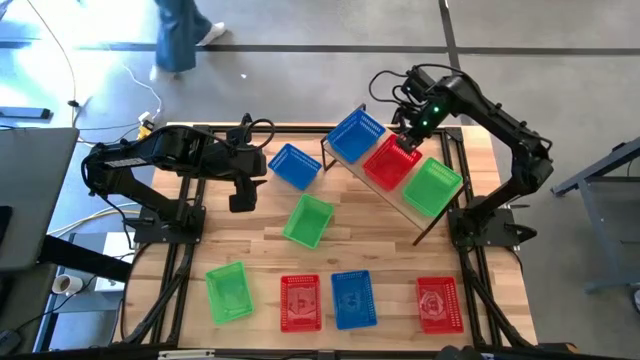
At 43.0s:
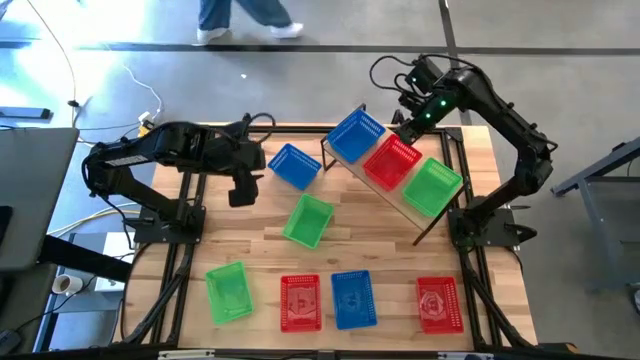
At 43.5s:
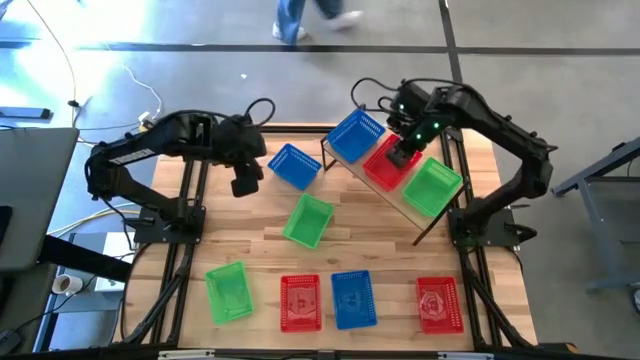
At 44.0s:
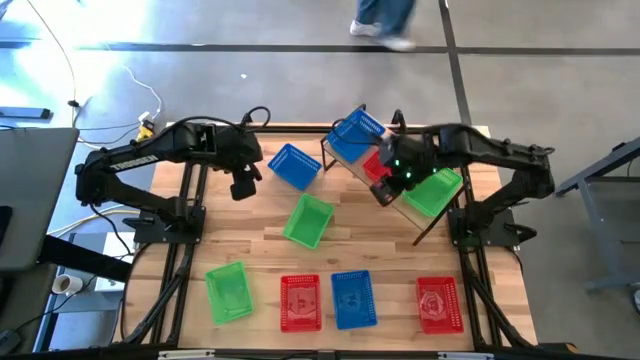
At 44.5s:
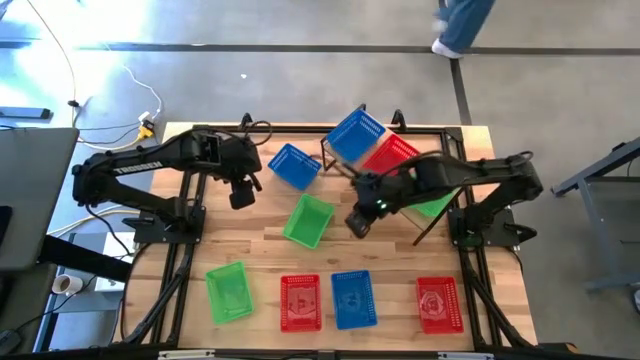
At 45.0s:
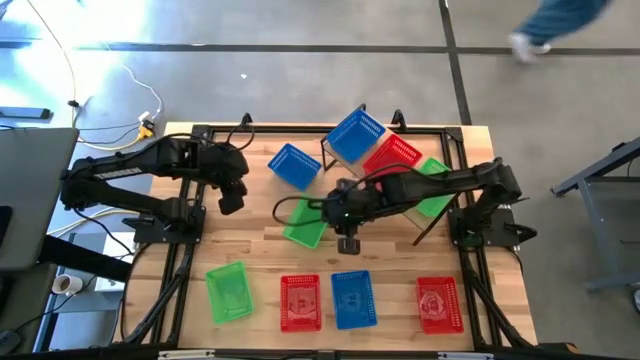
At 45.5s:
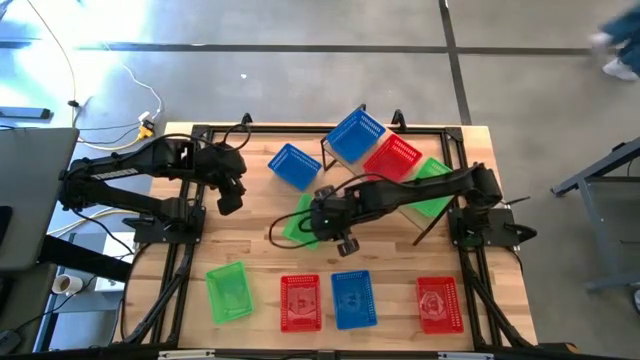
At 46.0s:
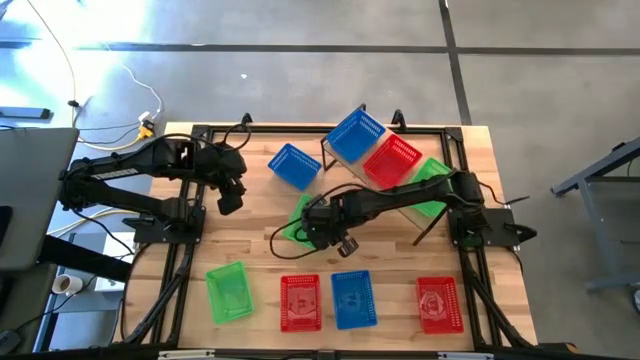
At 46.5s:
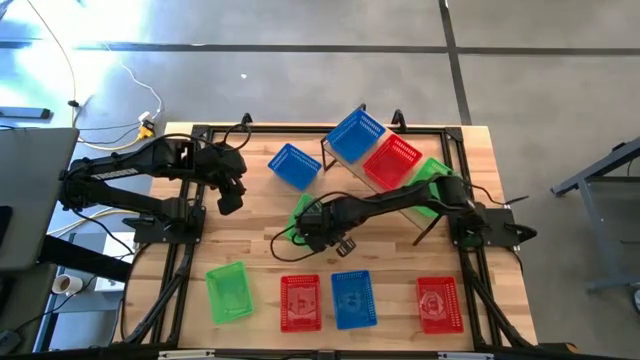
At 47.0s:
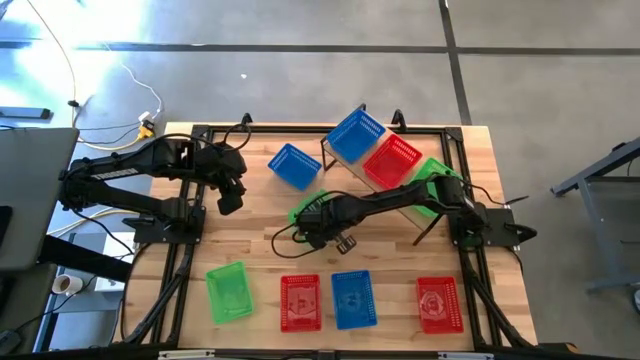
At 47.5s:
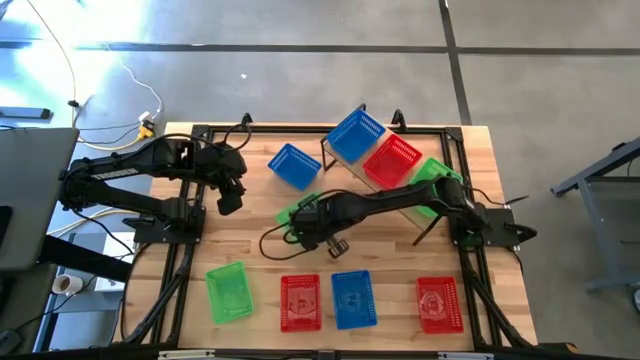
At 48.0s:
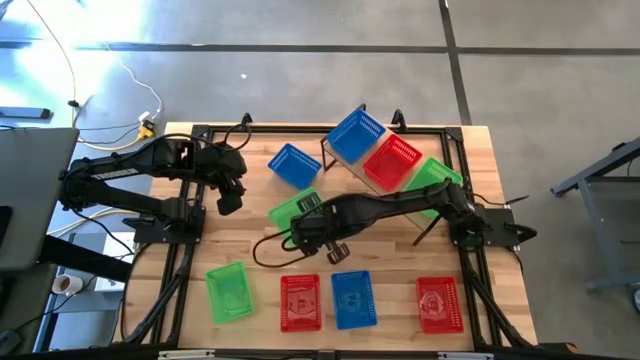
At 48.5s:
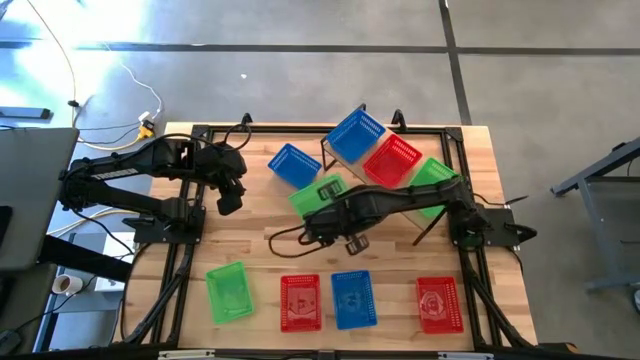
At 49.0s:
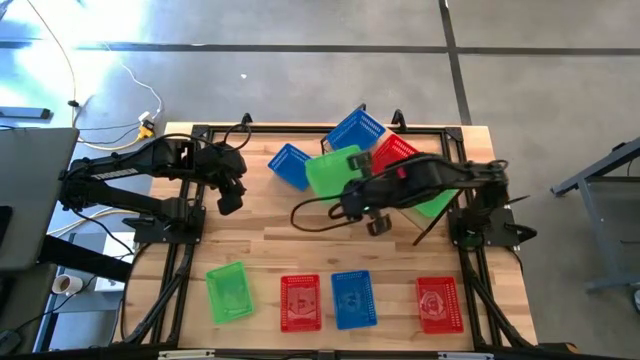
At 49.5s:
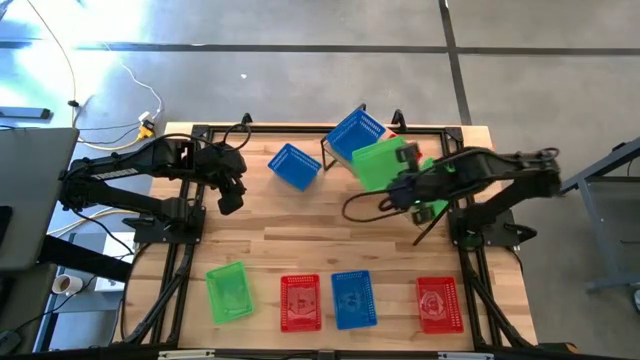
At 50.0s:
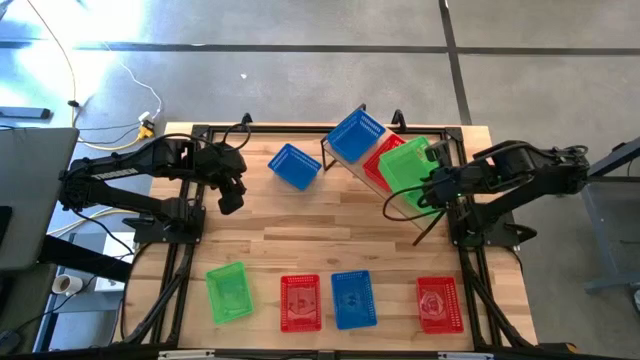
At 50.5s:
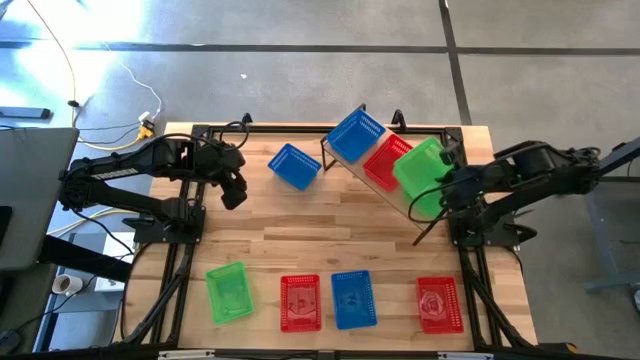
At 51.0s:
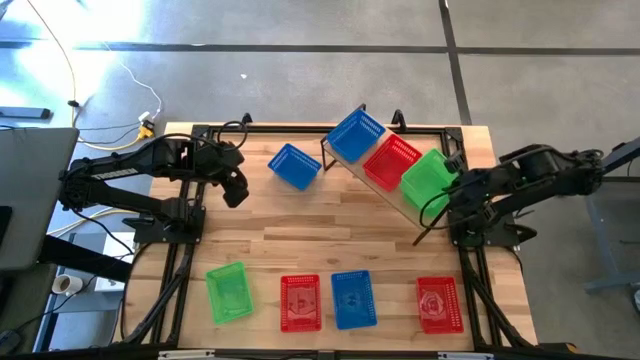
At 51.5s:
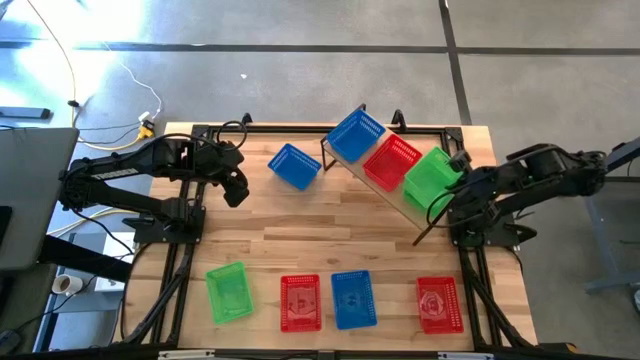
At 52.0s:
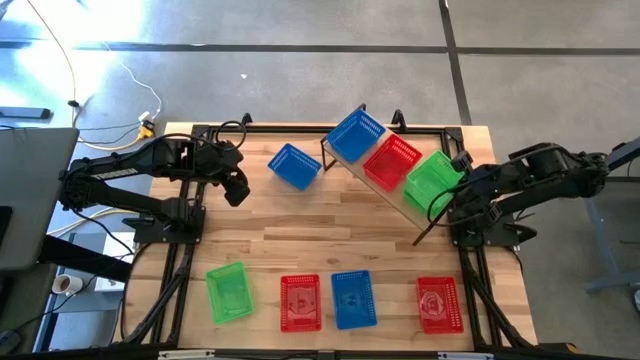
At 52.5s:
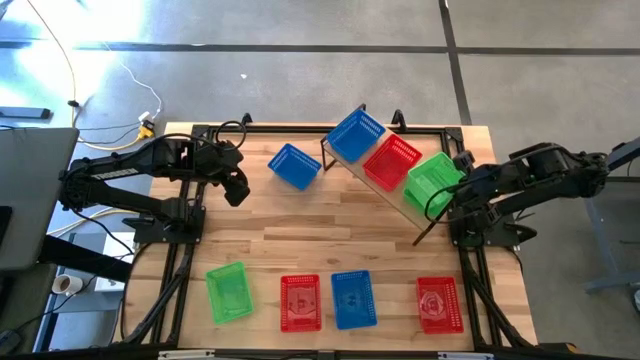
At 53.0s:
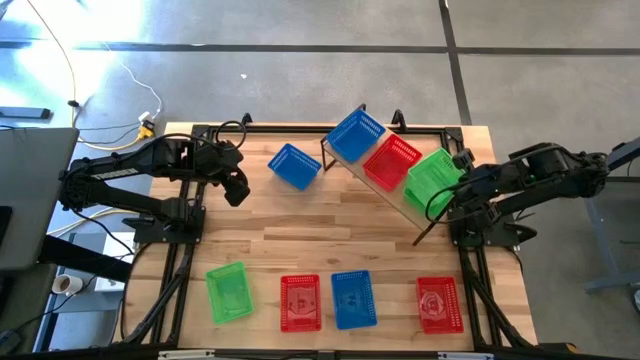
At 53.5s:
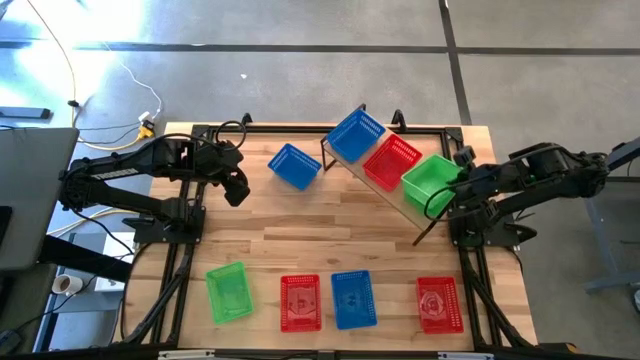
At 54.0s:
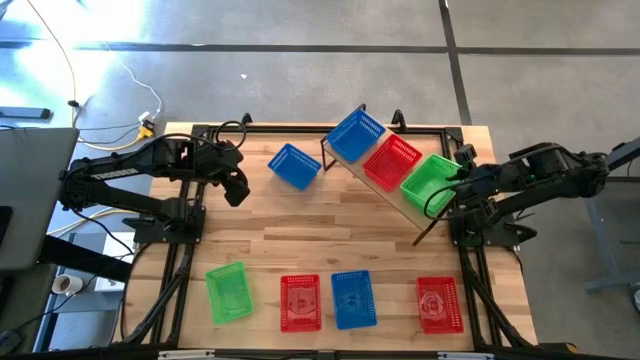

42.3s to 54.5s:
Task: Stack baskets on shelf by color
Stack the top green basket on the green basket on the shelf

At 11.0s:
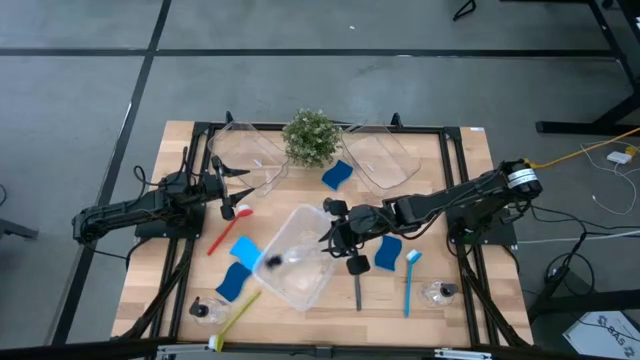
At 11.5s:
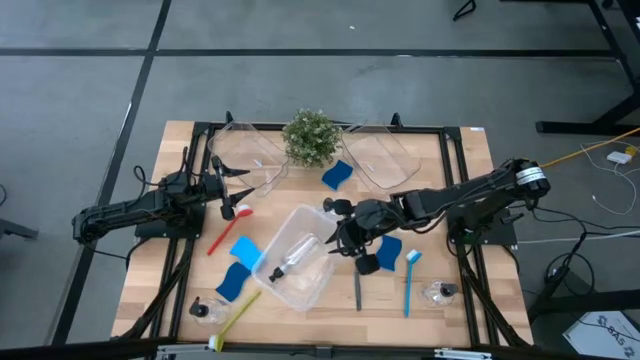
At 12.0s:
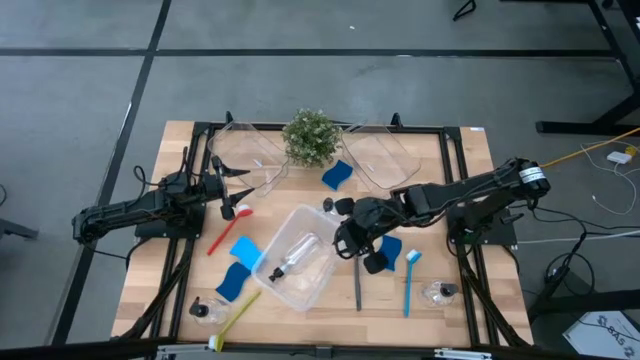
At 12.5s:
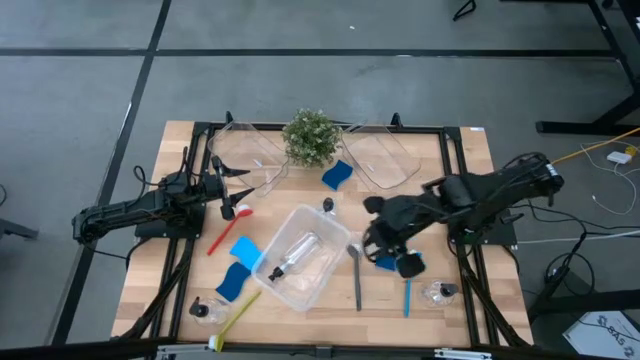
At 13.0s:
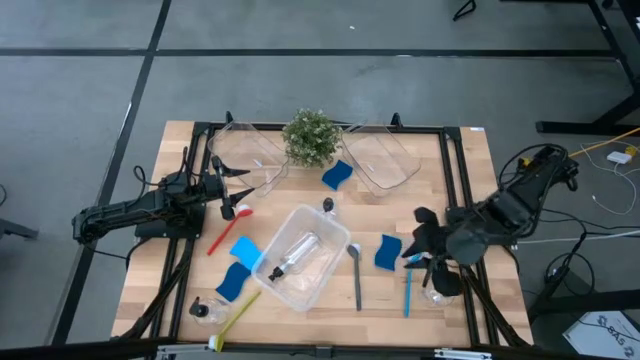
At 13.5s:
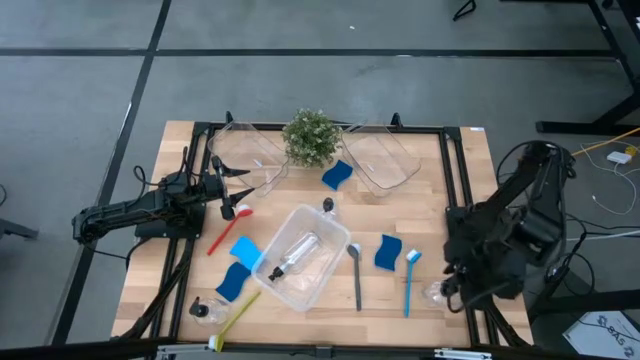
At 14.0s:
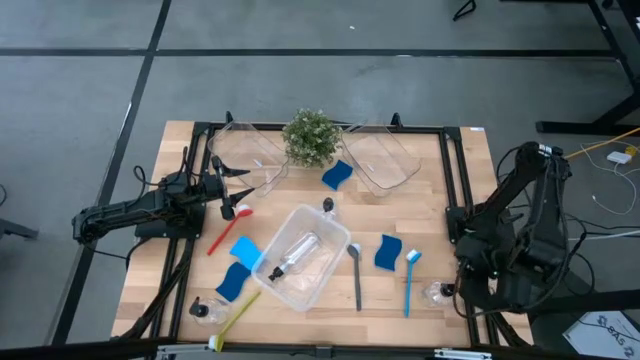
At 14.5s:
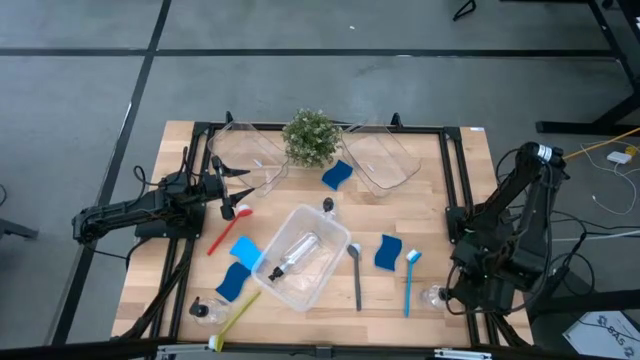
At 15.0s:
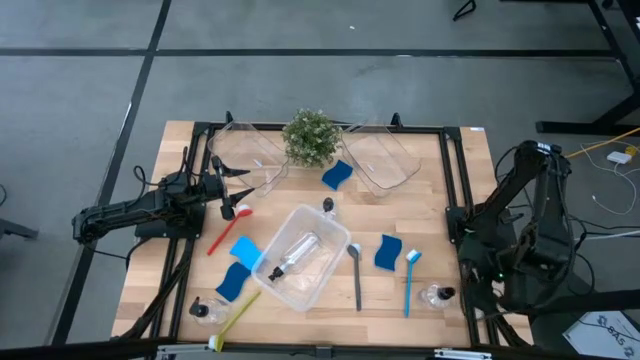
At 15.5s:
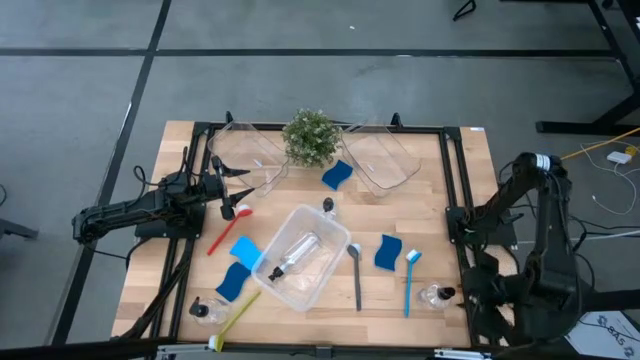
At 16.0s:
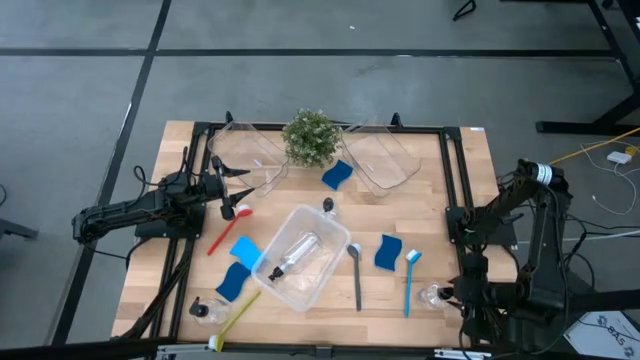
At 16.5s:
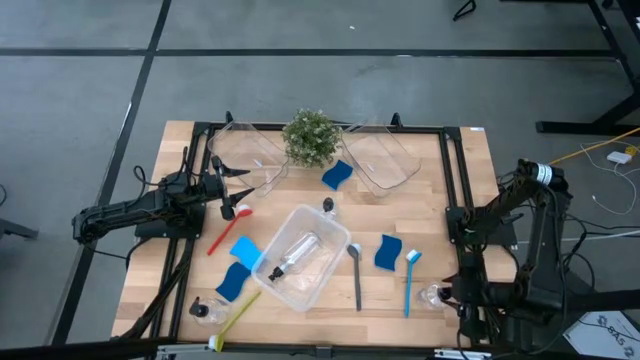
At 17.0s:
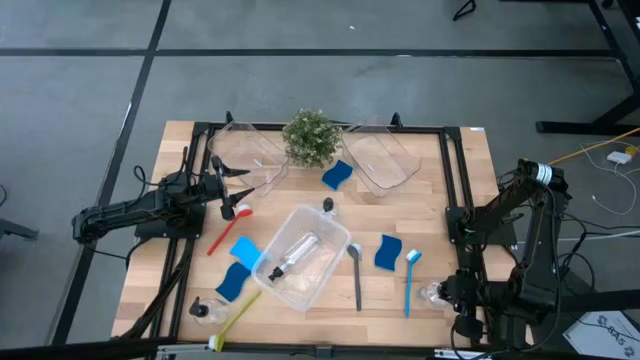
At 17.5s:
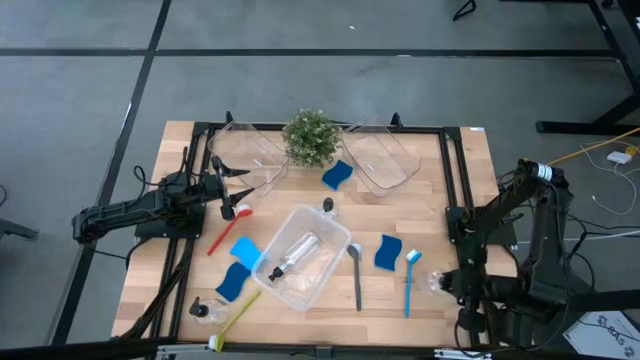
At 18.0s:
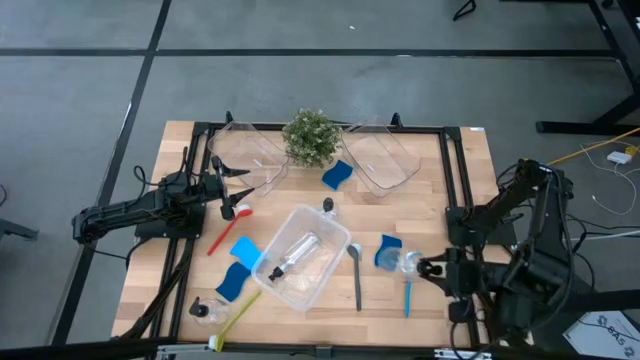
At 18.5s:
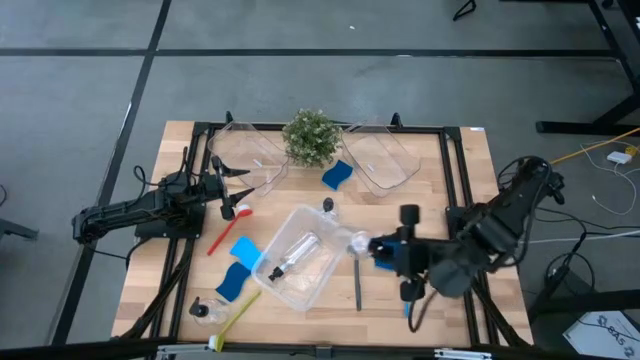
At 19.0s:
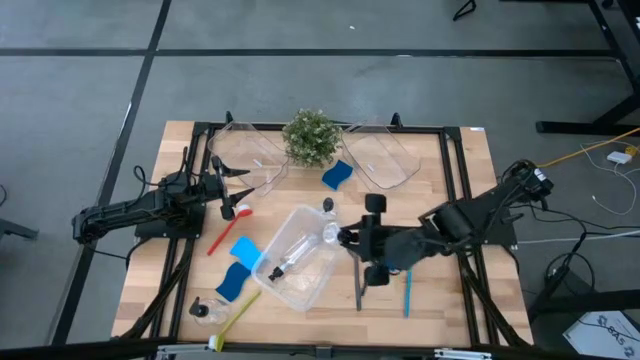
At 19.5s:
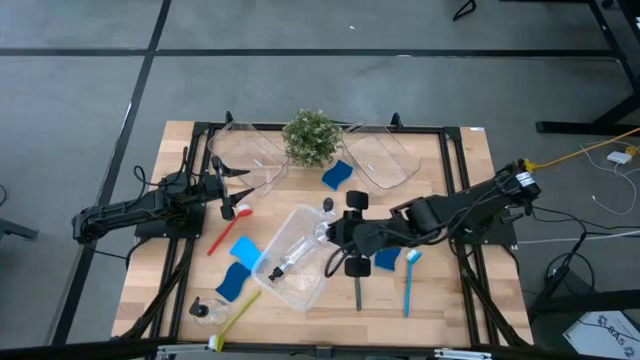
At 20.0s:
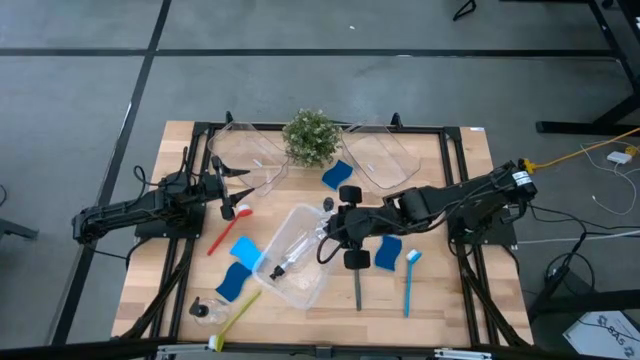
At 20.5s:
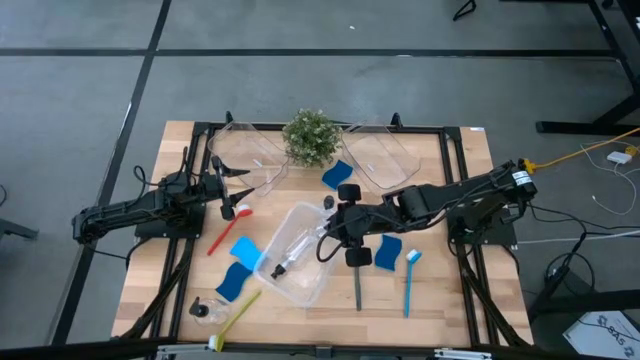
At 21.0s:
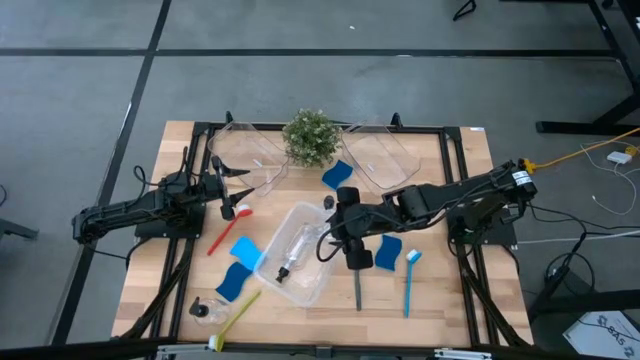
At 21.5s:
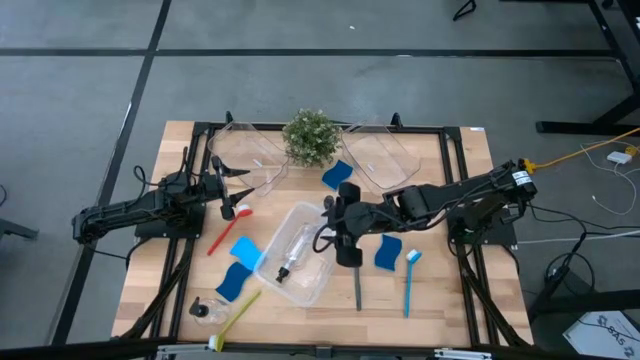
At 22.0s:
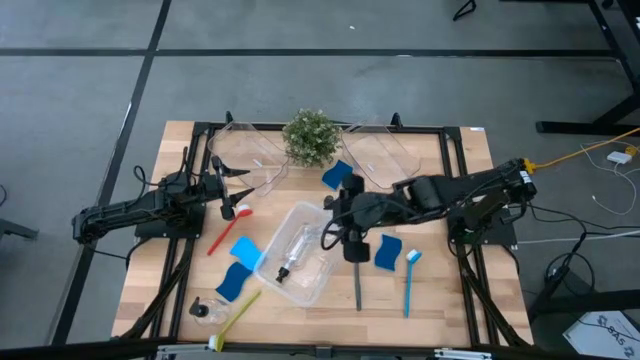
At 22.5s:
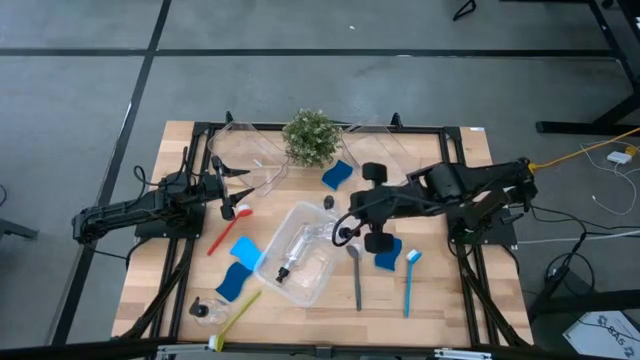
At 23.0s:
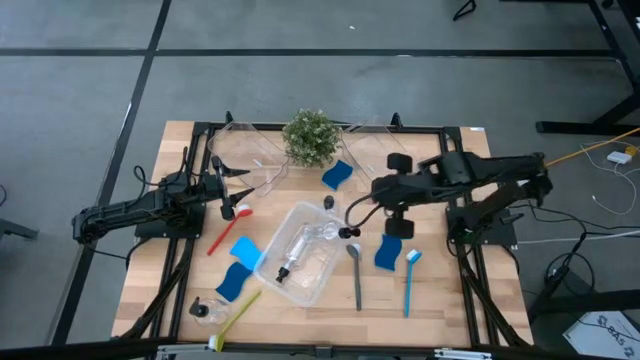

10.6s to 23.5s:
Task: Pick & Place Kitchen Sink Supplies
Put the liquid dispenser bottle into the white bin
